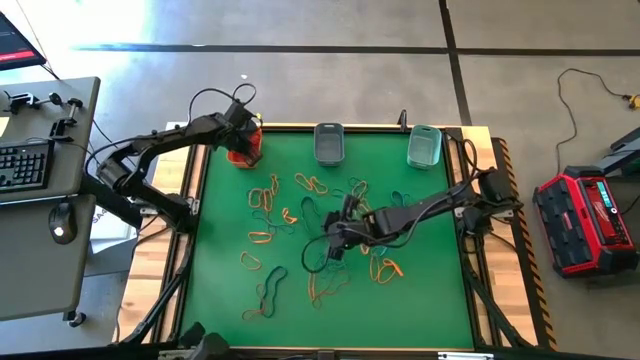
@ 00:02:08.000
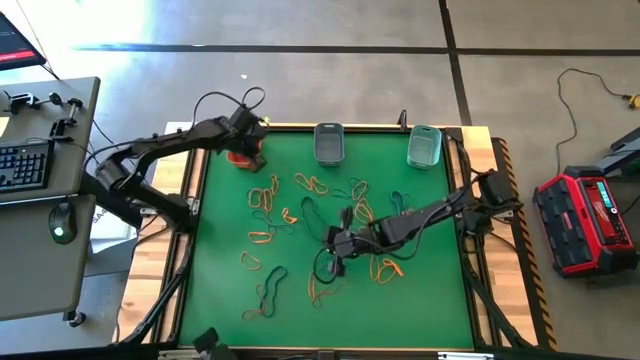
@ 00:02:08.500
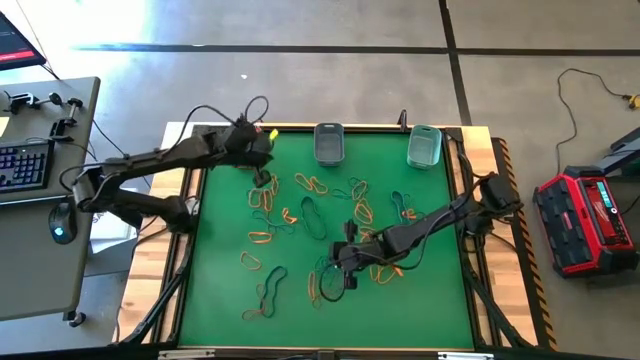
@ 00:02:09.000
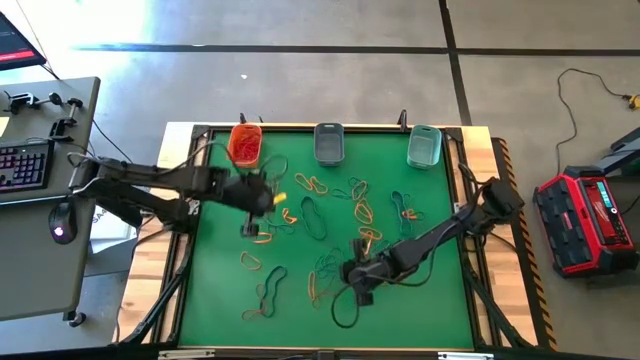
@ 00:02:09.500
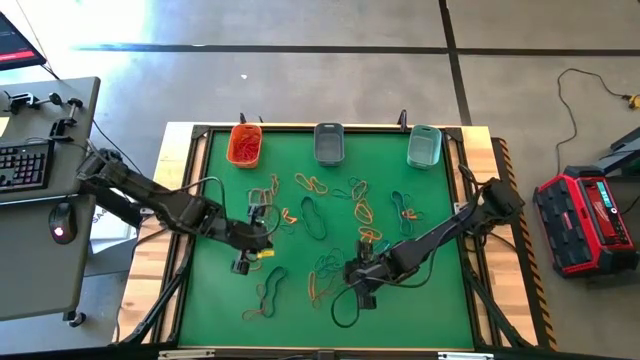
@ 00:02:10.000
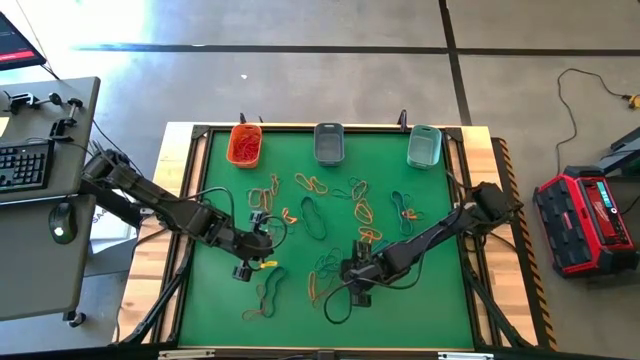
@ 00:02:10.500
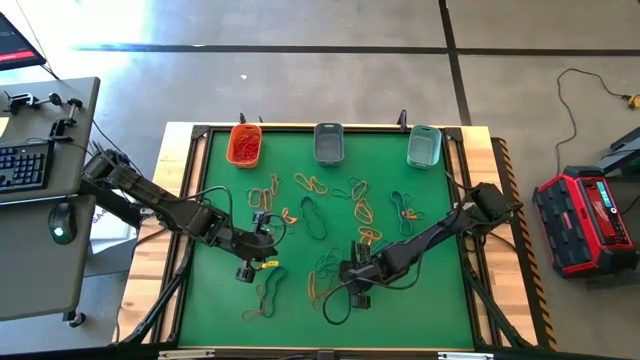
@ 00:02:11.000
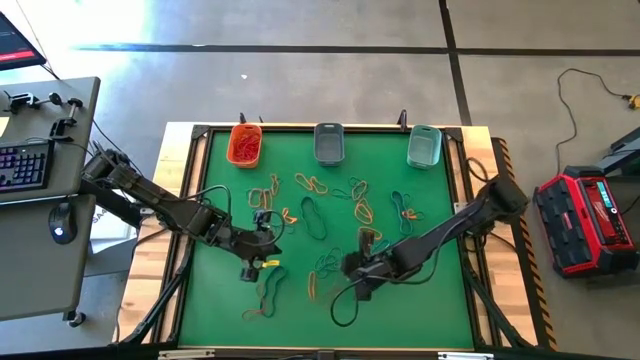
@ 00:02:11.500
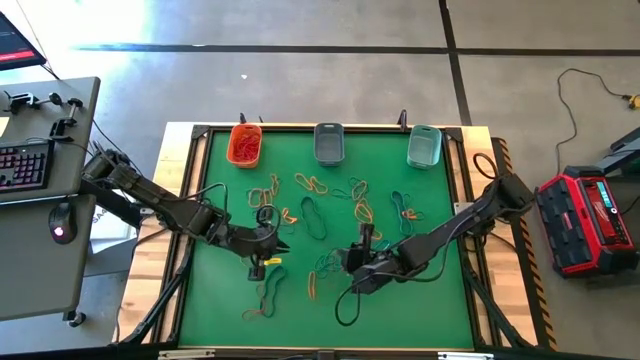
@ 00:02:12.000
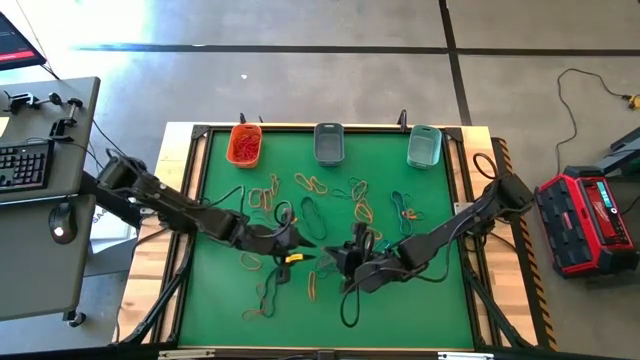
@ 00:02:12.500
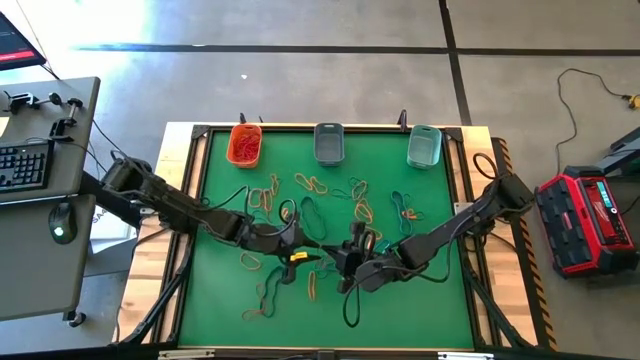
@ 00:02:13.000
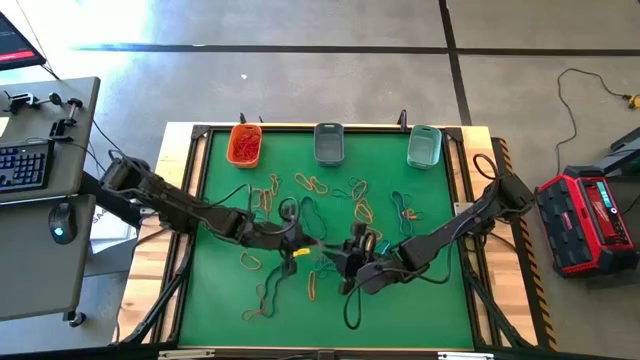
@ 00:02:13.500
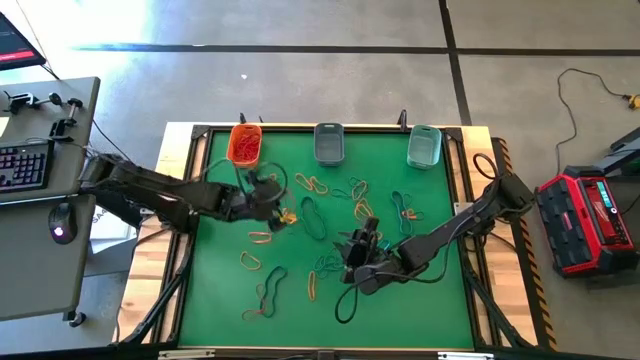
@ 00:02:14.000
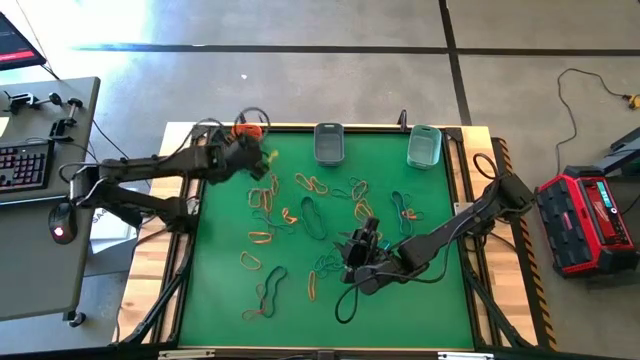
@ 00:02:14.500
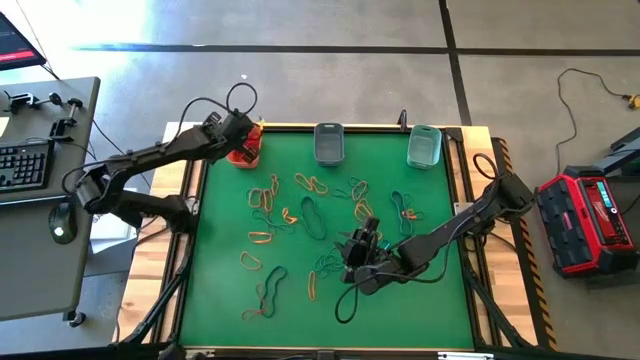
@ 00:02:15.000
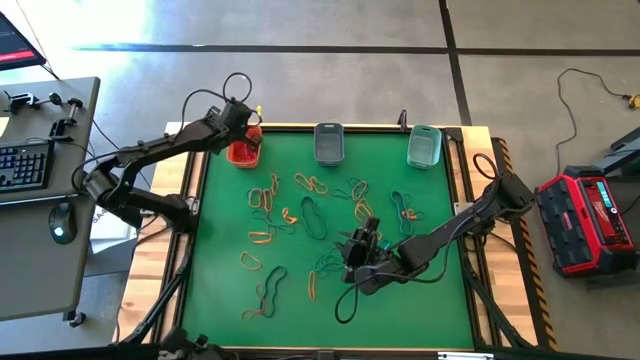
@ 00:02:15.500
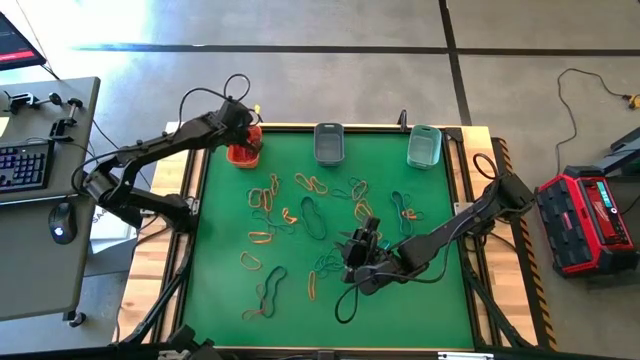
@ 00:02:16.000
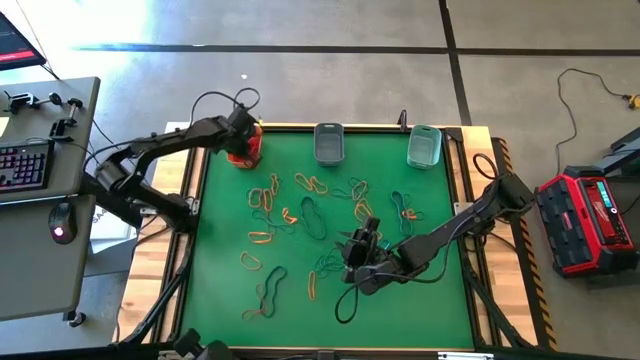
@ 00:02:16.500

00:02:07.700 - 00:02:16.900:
Task: Sort rubber bands into baskets
Put the red rubber band into the orange bin

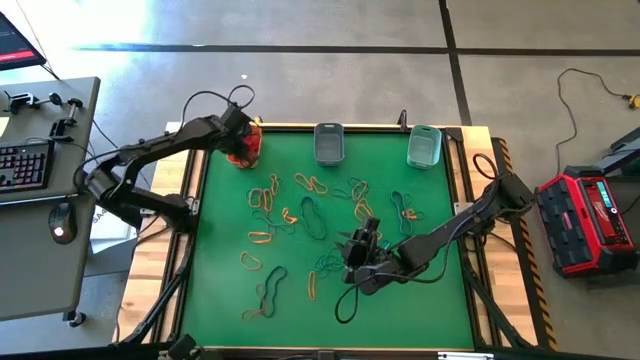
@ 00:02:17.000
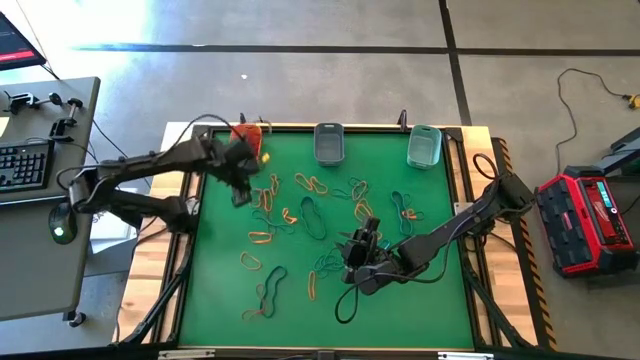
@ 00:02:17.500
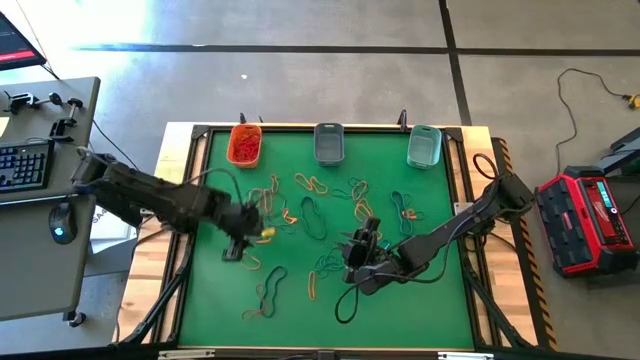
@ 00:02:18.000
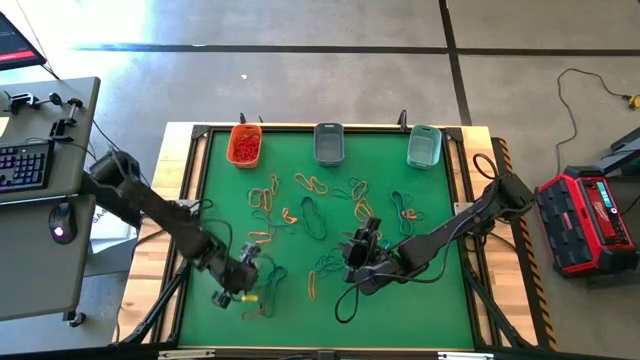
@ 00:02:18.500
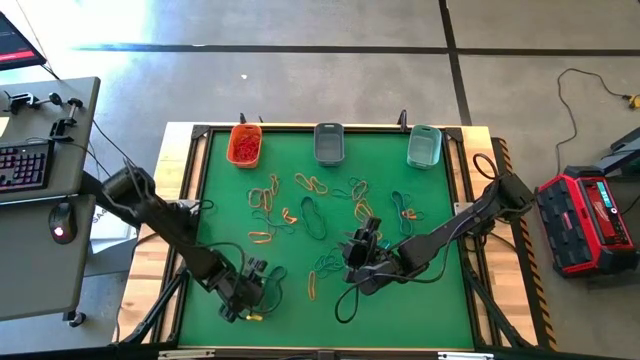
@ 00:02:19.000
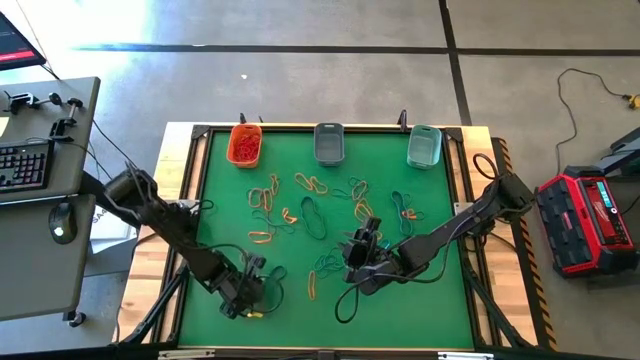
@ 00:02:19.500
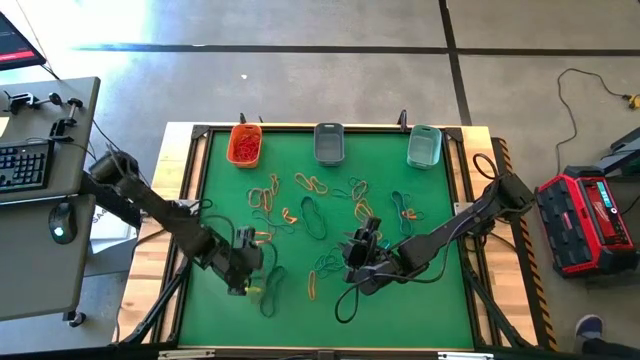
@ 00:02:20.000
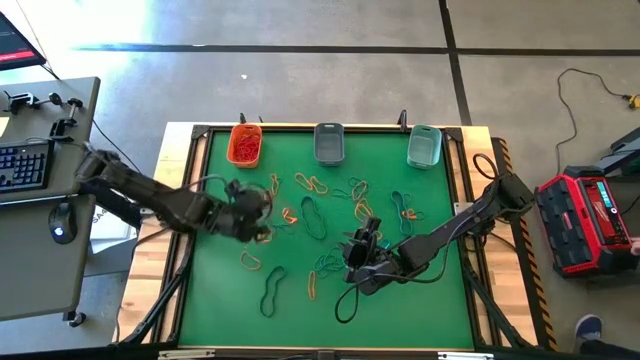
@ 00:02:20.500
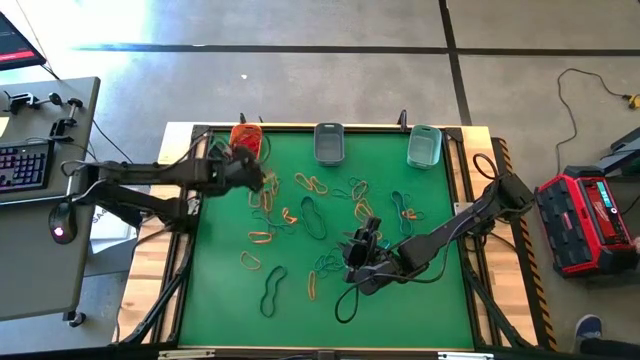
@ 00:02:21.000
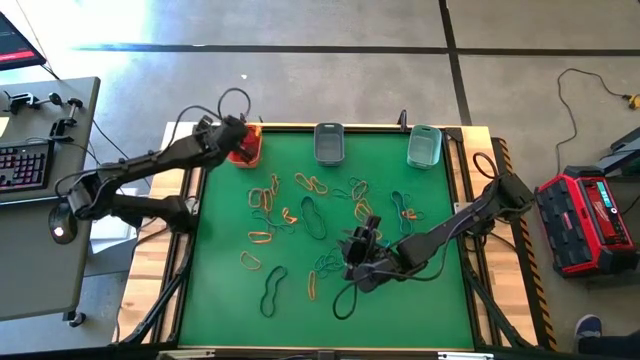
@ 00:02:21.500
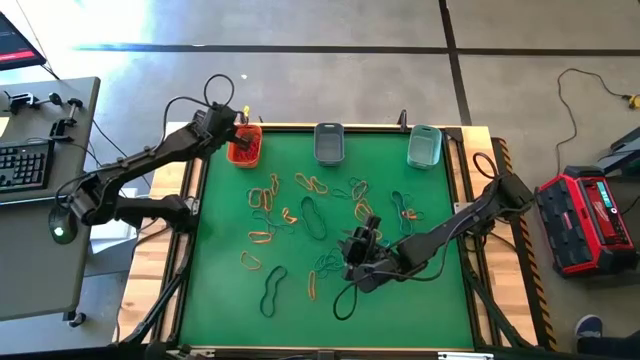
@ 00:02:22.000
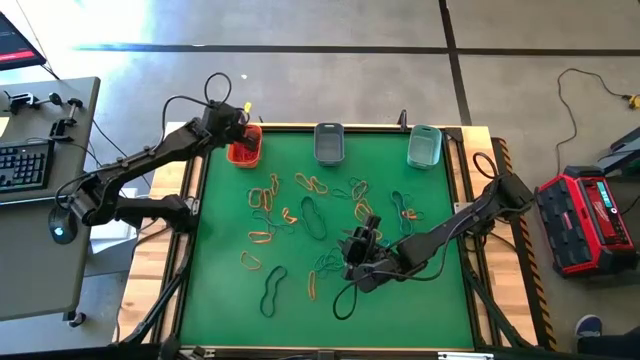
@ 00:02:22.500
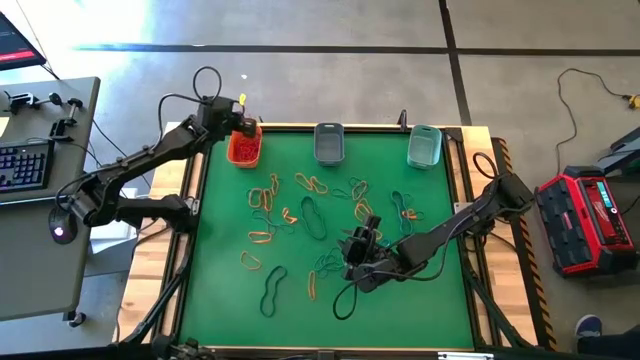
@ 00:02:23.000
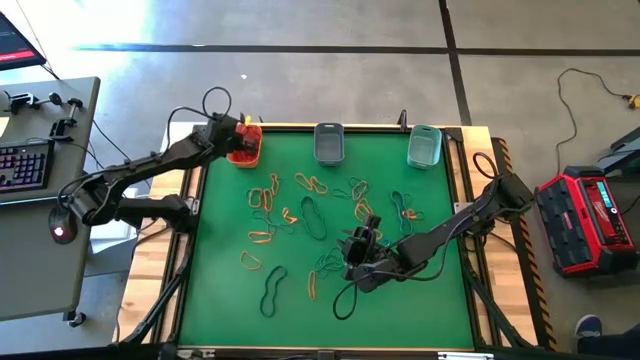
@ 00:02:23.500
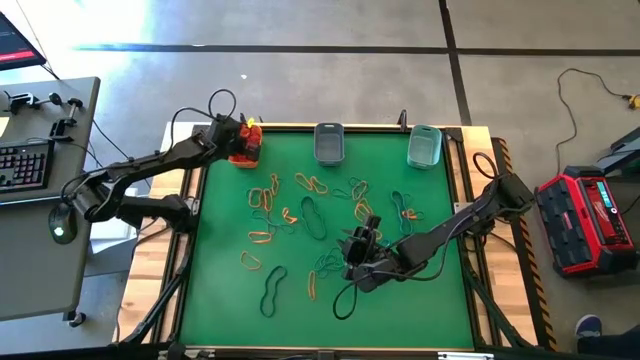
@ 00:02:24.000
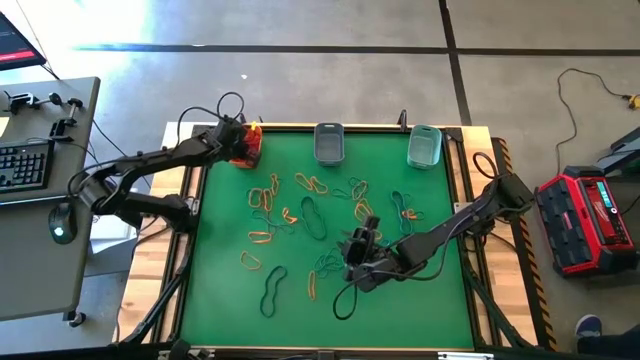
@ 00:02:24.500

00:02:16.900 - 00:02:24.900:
Put the red rubber band into the orange bin

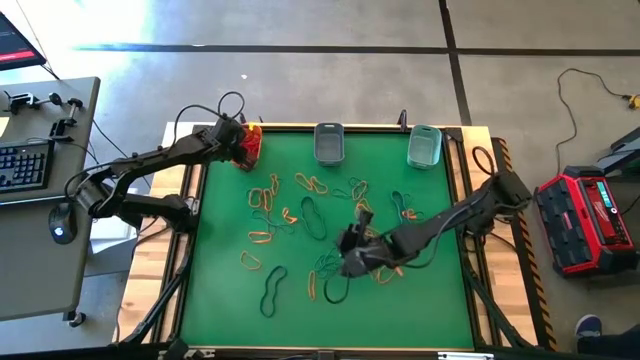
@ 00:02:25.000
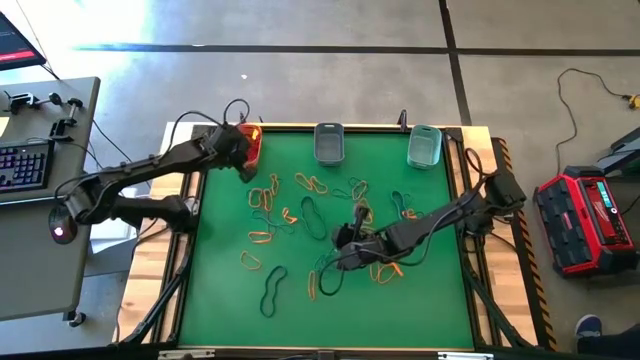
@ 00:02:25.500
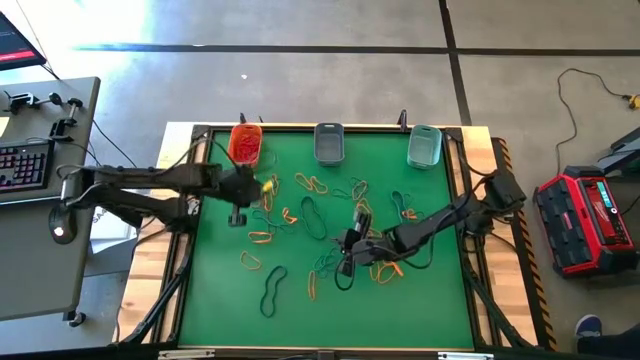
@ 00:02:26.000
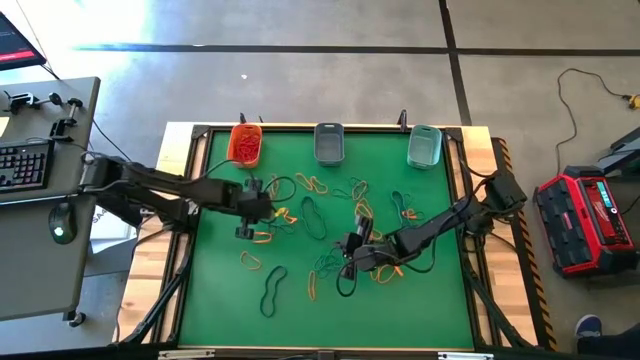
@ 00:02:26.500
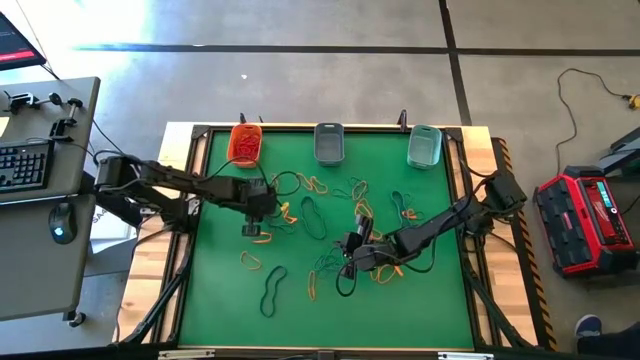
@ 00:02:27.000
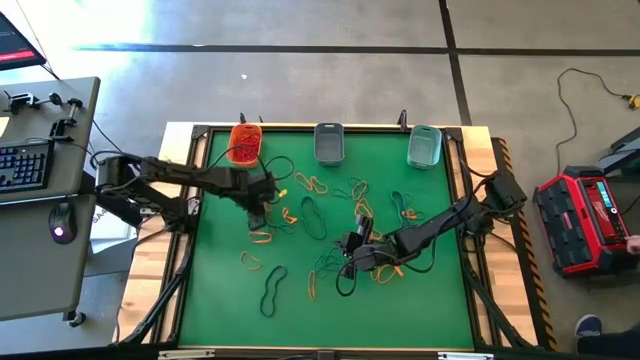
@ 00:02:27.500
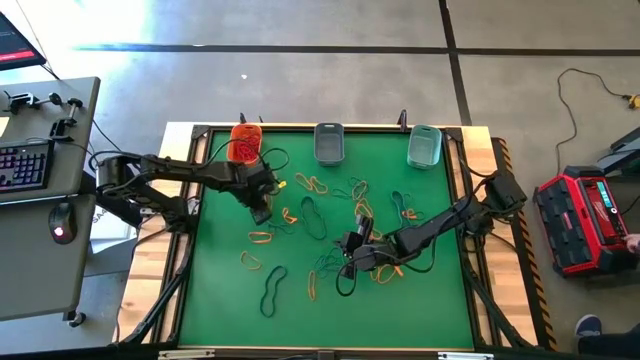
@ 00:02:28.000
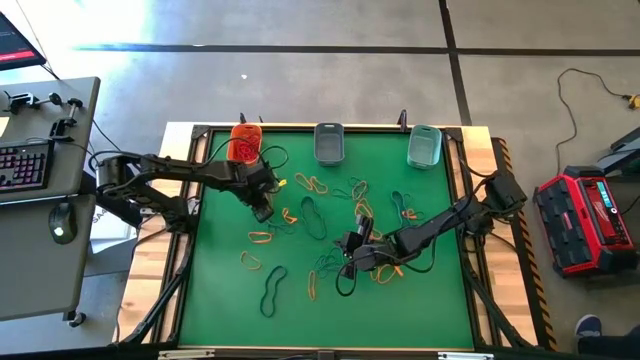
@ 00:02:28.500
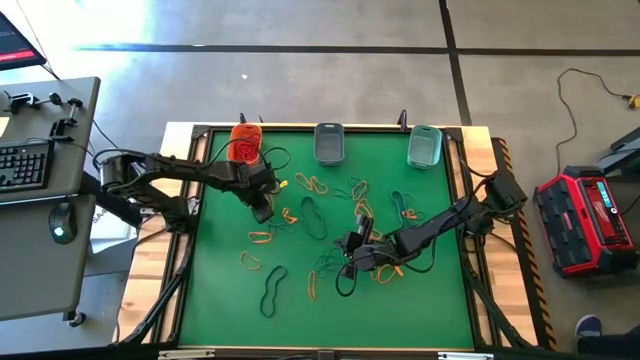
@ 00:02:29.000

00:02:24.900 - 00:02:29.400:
Put the red rubber band into the orange bin
